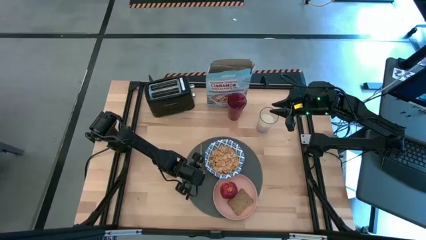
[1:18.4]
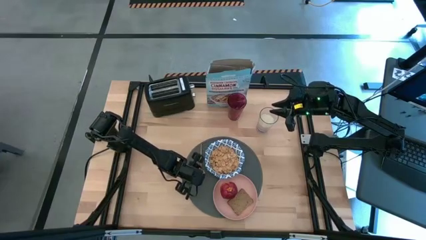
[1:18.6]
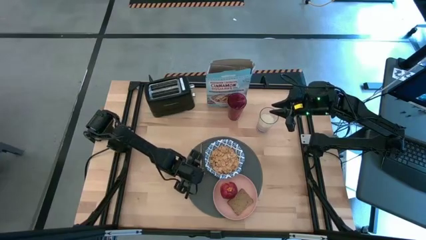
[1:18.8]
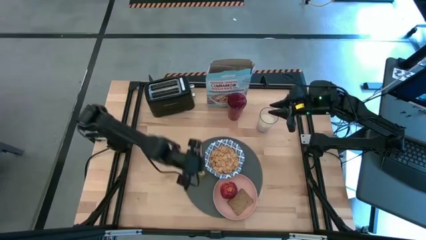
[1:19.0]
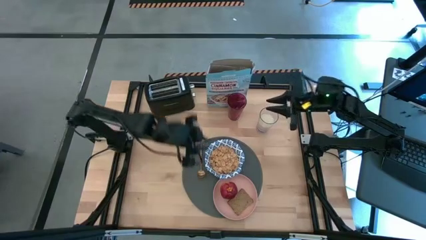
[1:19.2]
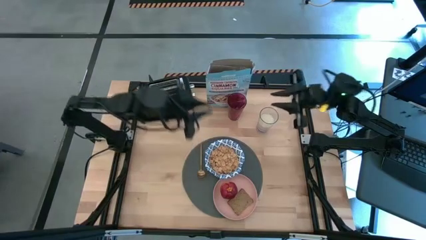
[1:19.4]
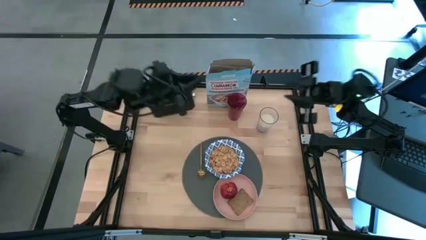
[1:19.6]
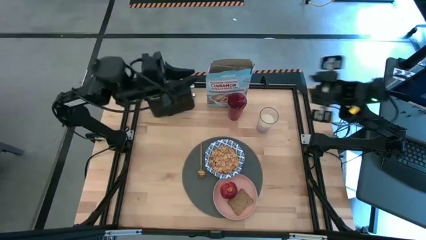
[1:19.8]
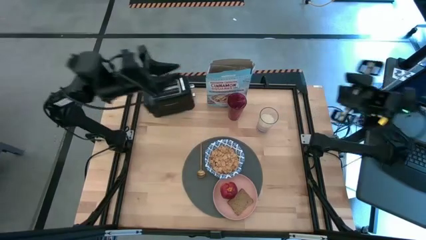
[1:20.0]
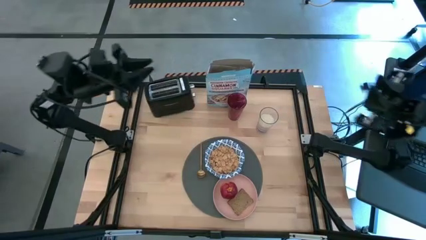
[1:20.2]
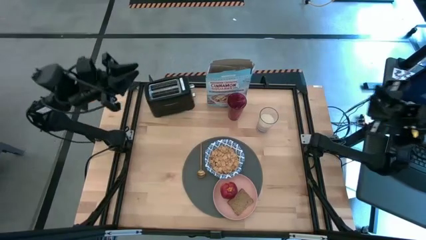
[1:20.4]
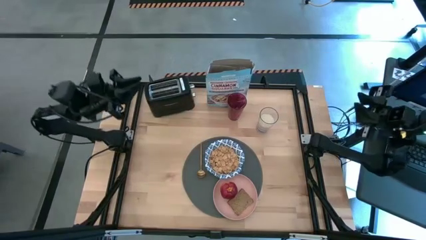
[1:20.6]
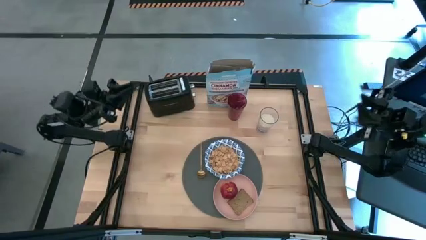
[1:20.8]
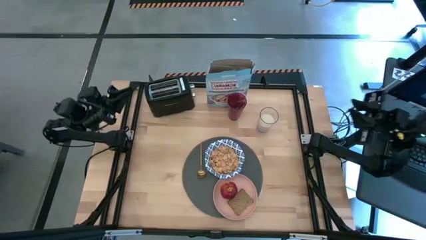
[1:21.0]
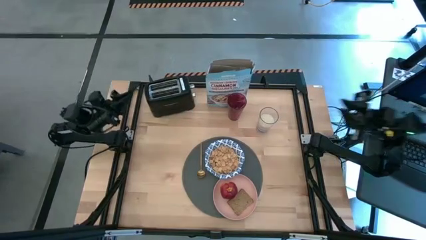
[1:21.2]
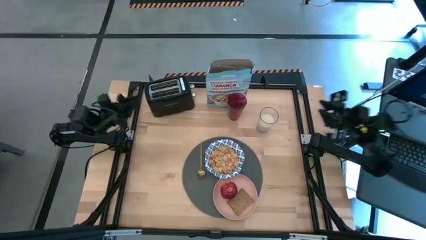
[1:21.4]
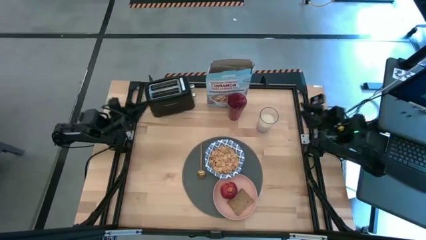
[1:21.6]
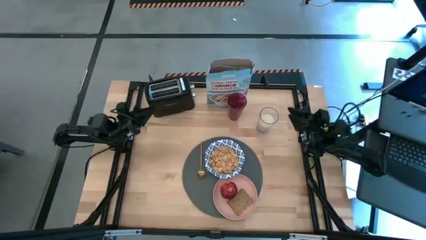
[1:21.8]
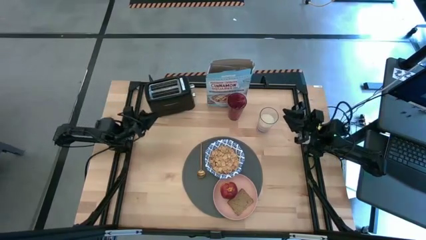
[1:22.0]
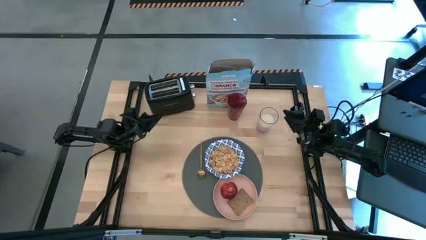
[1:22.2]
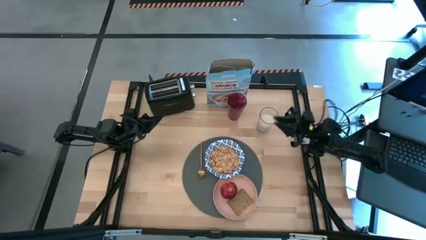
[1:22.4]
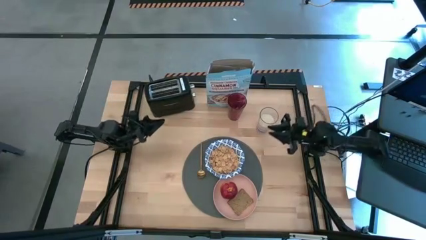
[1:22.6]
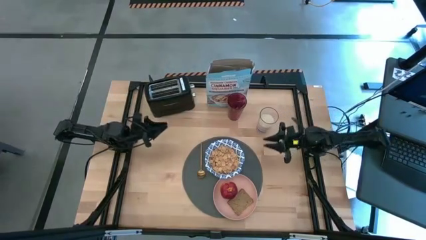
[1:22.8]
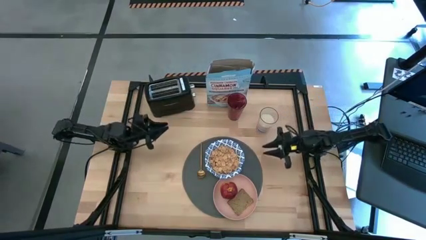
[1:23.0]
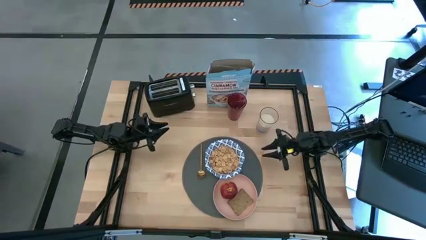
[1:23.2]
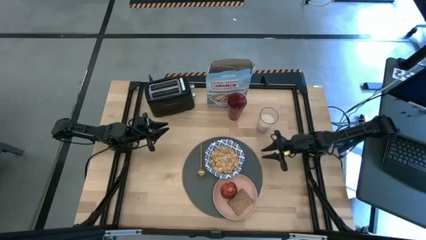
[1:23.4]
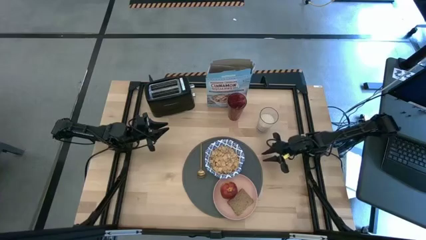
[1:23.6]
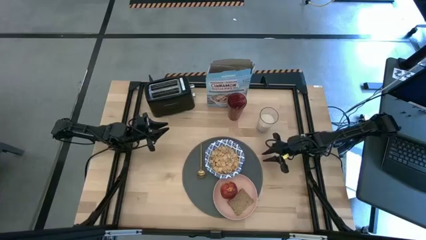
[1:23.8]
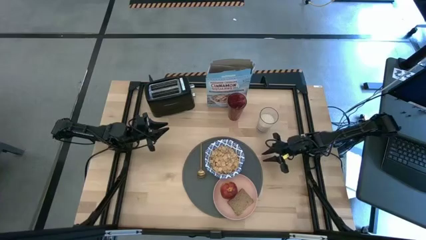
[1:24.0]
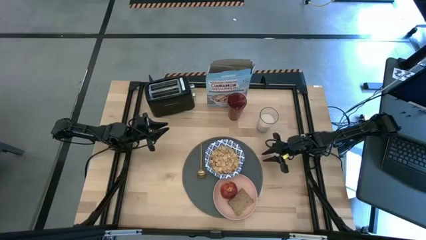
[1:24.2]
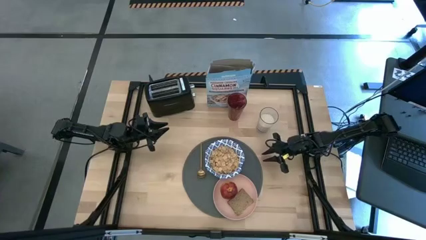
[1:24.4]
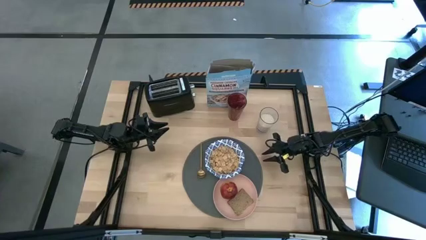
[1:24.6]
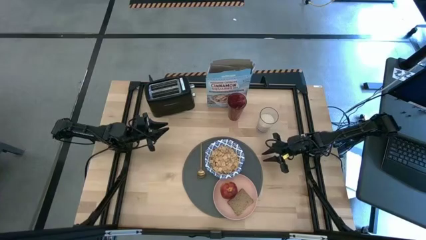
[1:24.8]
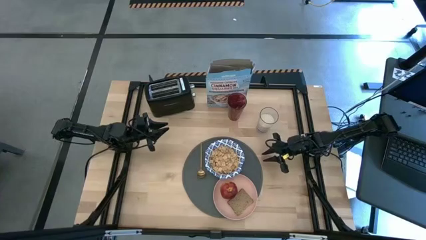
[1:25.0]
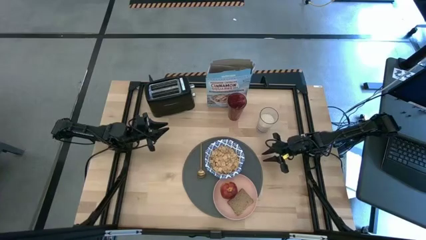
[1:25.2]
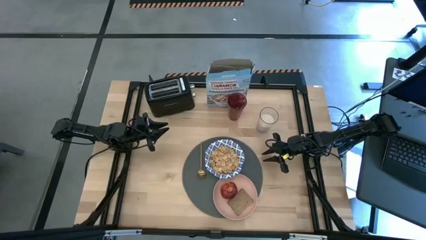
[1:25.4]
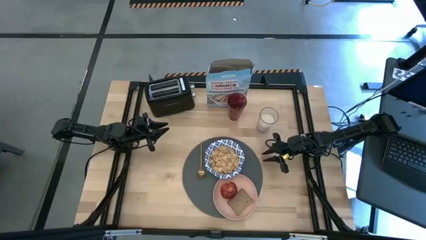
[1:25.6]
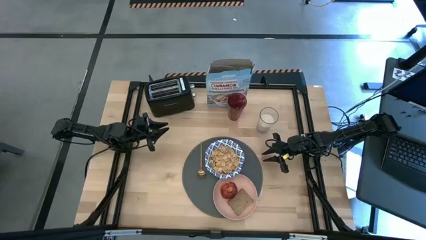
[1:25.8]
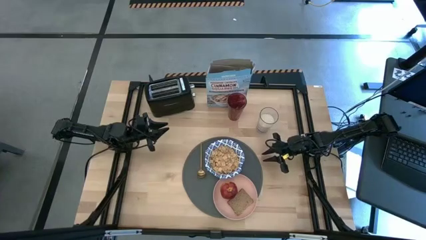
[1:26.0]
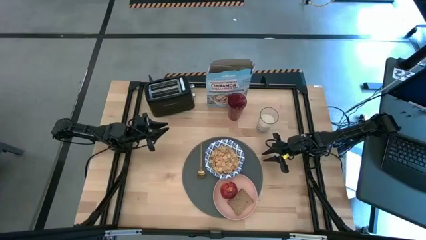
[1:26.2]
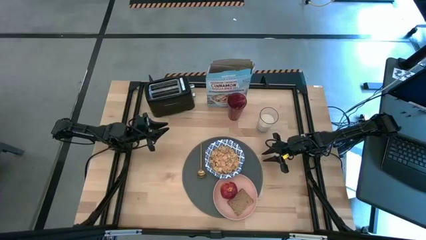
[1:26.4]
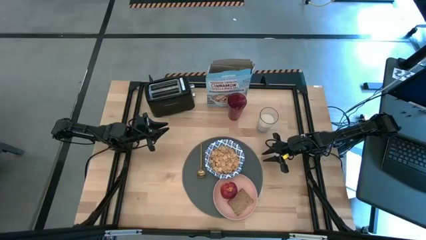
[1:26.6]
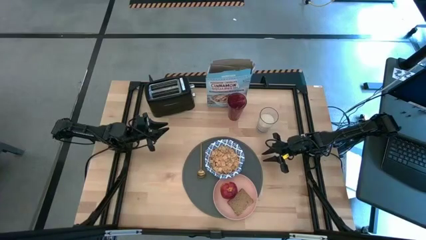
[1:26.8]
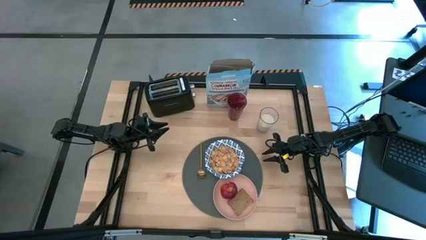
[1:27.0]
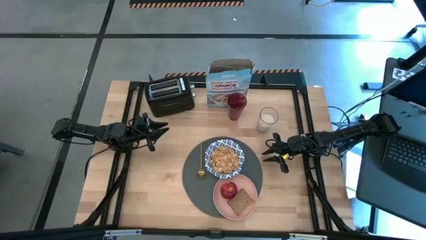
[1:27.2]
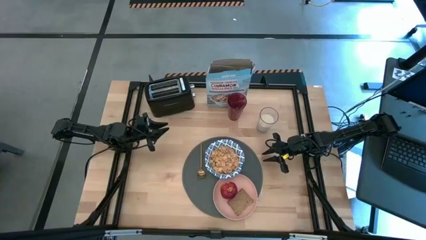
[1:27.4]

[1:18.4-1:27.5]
Task: Arrange a breakfast setting
Return to Home Position

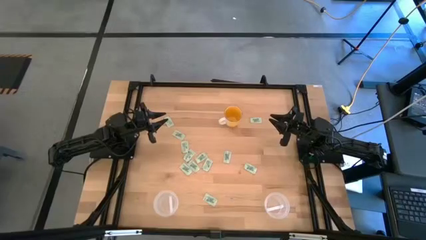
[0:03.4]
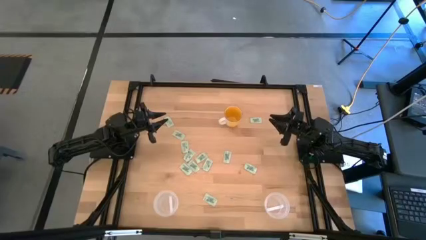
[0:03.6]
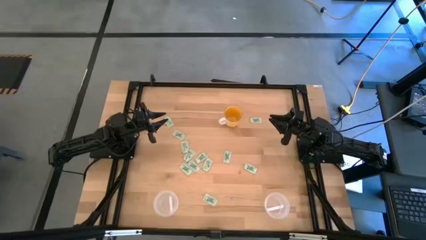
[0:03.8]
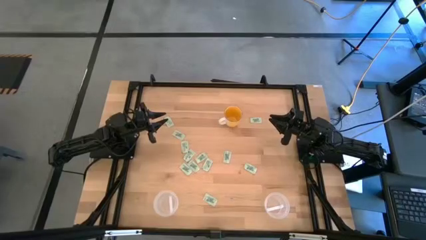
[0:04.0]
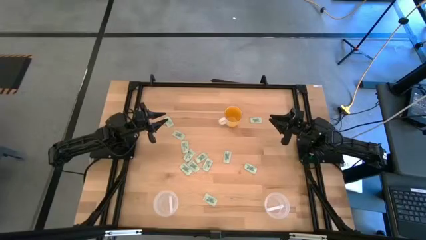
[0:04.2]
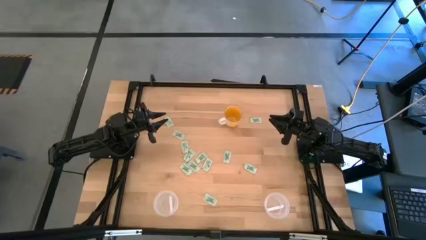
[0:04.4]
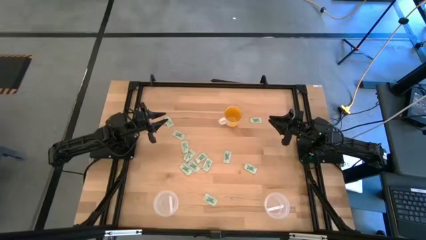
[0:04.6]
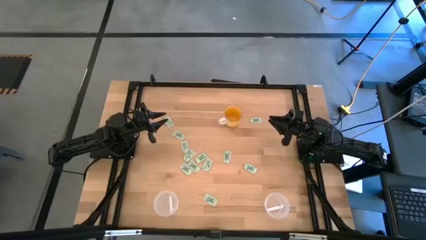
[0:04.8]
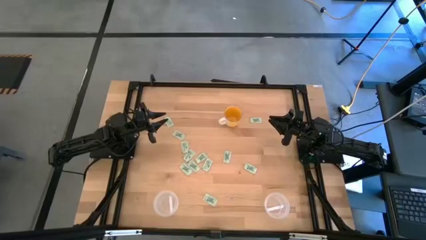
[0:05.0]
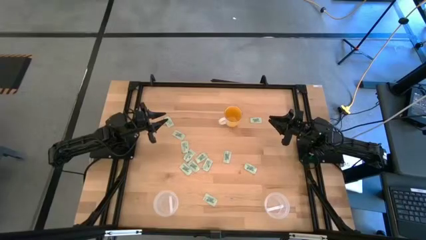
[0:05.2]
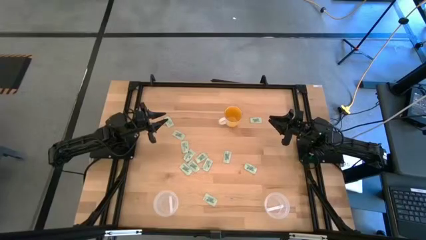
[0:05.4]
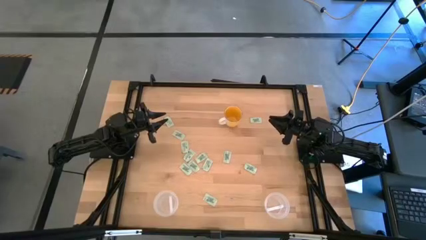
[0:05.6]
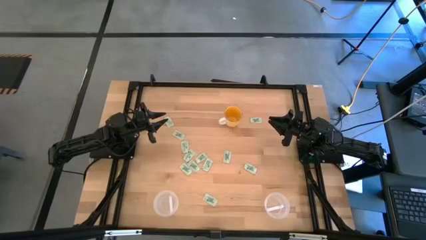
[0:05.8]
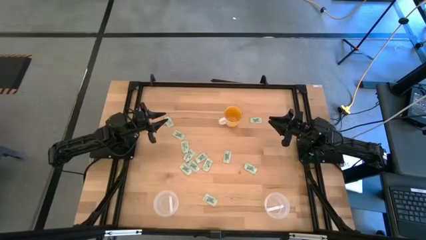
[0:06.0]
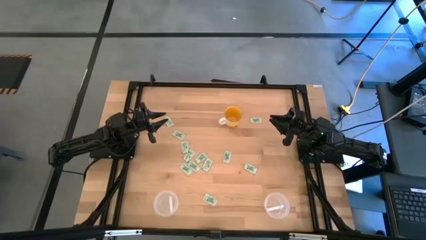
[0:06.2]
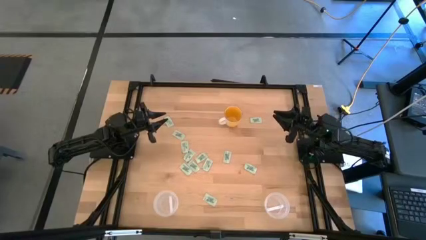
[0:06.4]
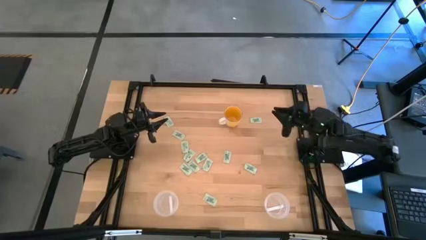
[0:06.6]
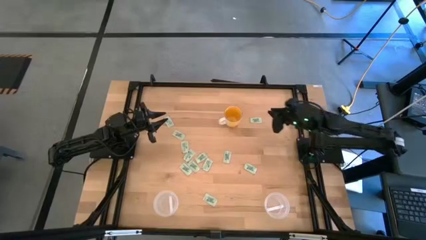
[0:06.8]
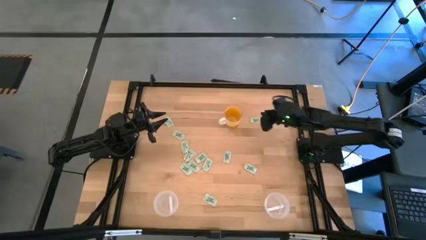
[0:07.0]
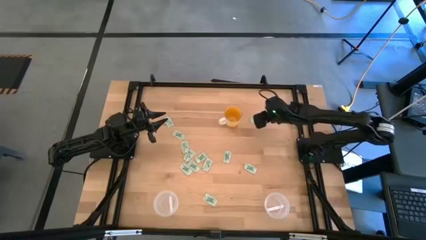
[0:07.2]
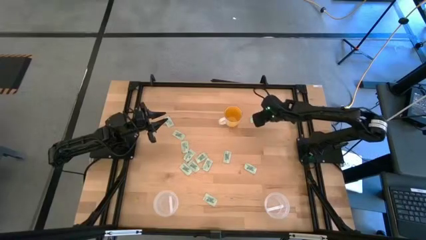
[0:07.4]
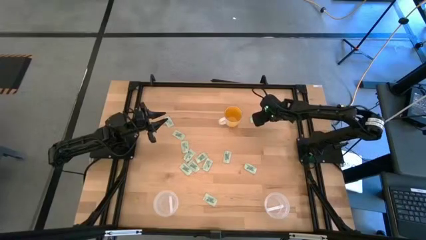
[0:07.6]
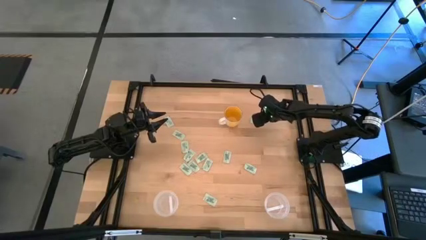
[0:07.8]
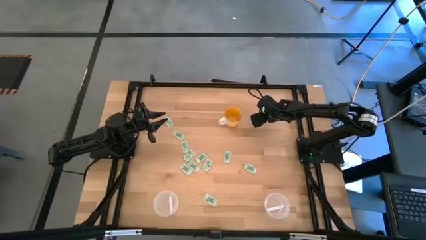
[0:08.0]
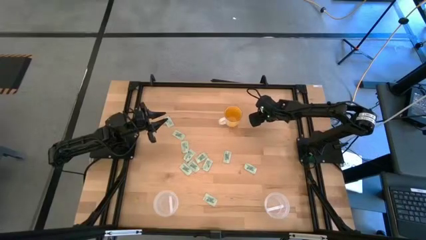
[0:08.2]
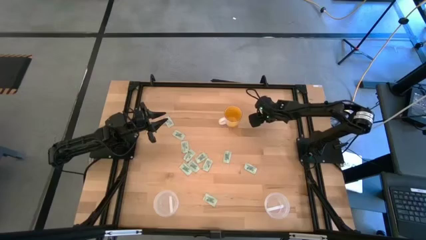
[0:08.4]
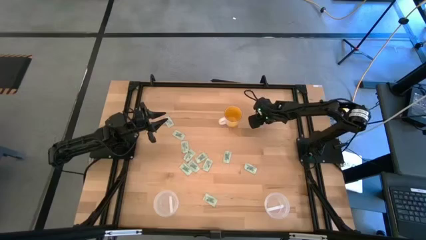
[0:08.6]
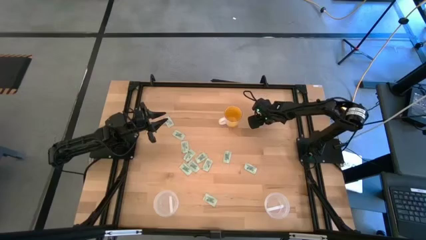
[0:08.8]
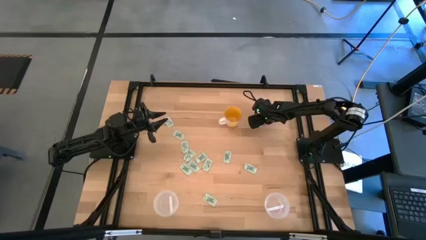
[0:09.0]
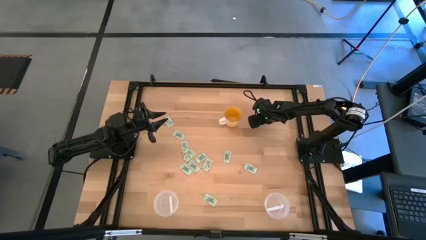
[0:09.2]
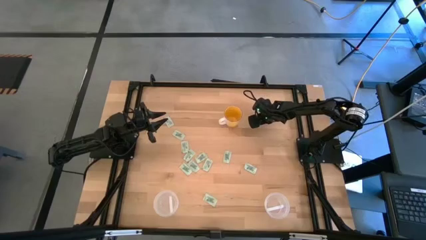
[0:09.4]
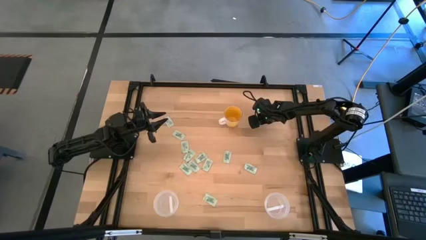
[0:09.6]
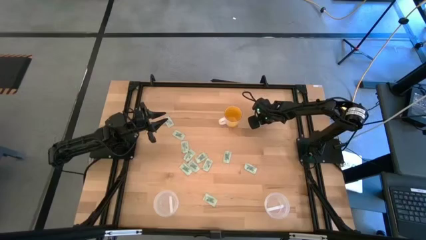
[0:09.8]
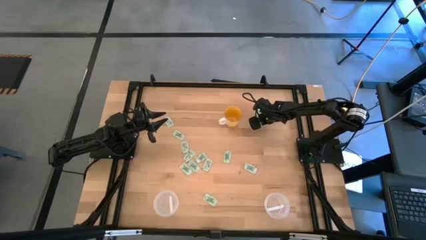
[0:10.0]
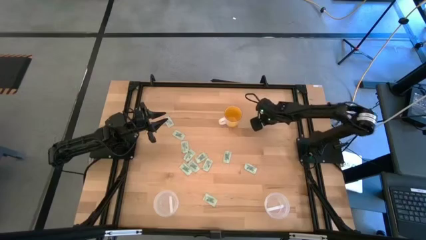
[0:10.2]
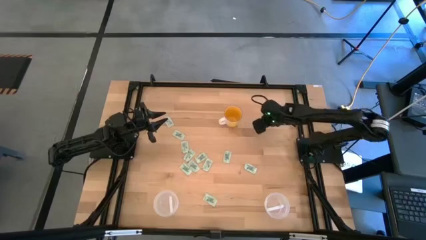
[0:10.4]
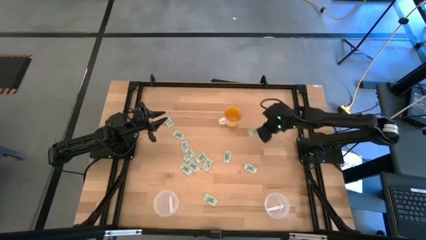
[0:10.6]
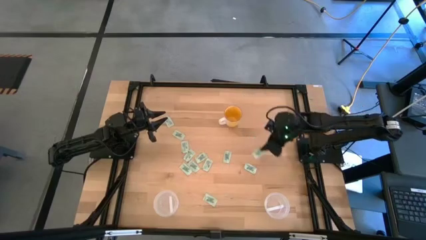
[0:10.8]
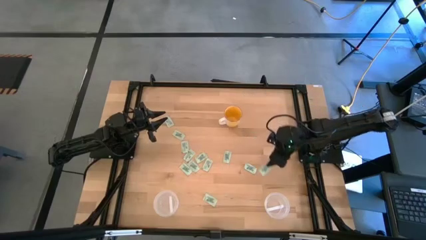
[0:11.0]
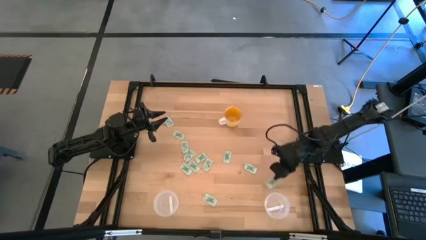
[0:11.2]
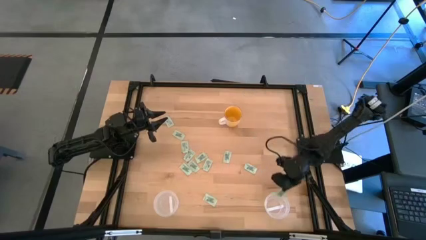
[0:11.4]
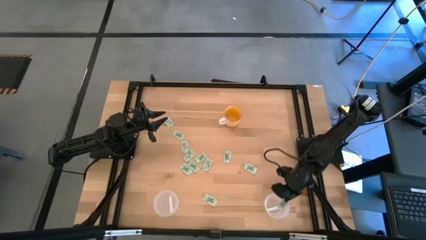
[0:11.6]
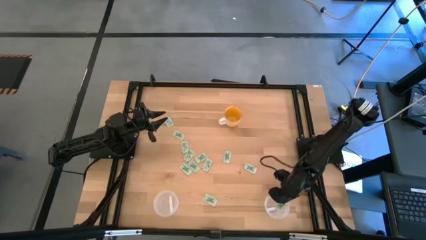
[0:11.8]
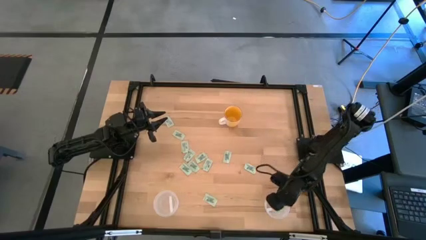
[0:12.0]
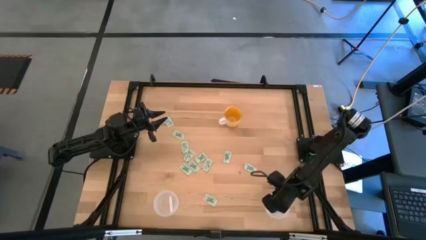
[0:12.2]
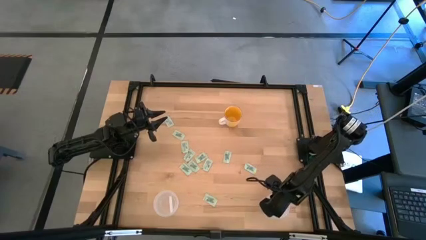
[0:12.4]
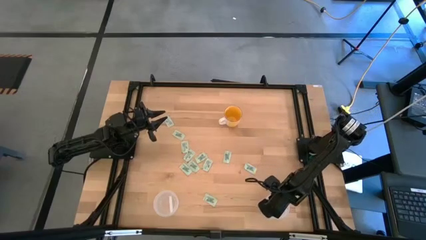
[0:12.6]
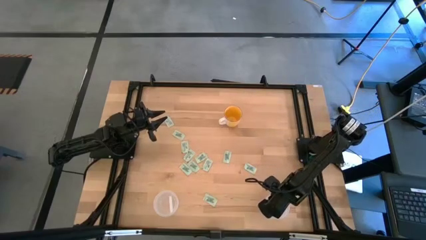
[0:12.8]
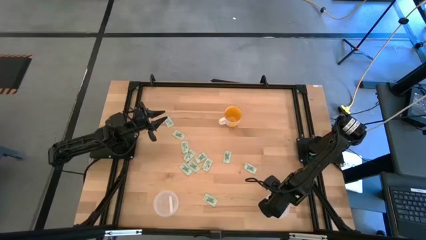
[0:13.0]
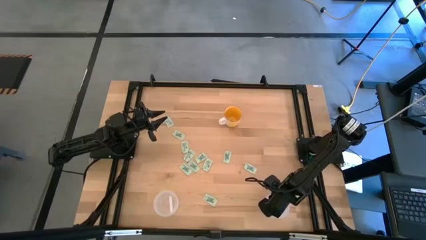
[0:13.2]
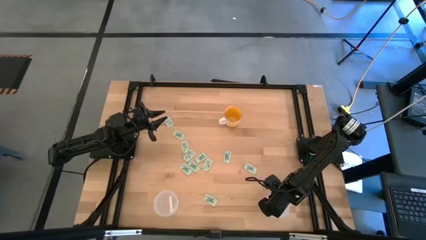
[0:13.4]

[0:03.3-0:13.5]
Task: Pick and place items into bin
Put the stevia packet into the right transparent bin
